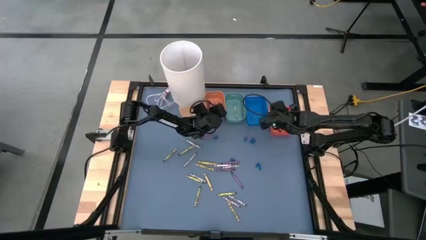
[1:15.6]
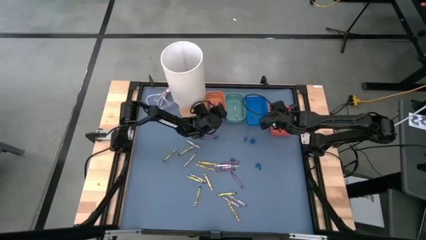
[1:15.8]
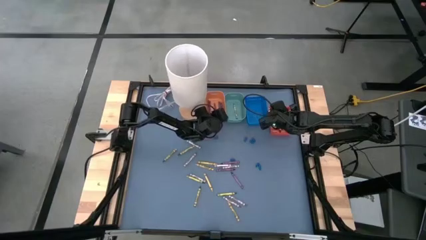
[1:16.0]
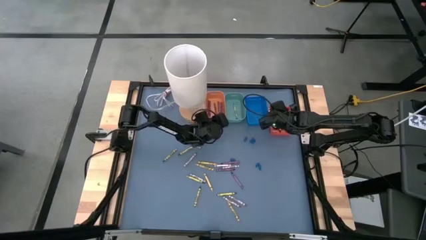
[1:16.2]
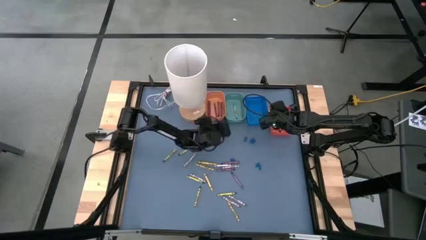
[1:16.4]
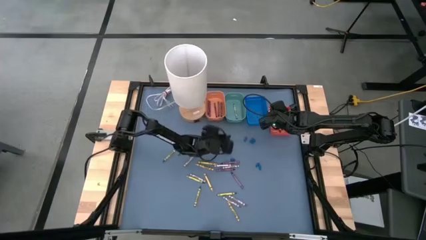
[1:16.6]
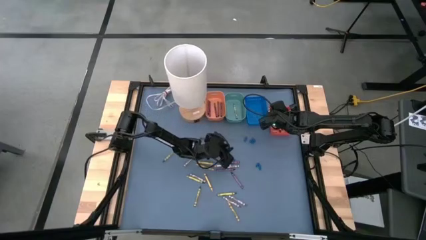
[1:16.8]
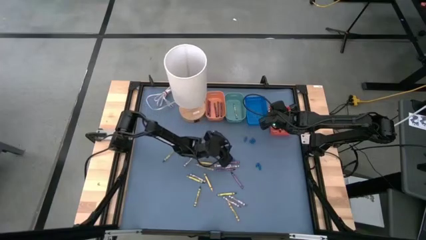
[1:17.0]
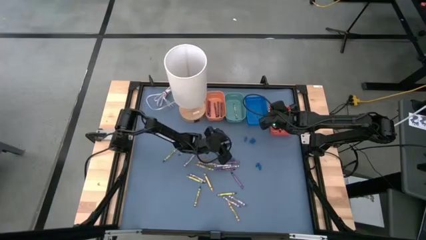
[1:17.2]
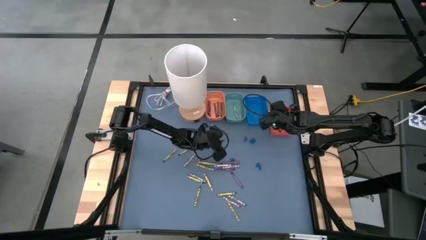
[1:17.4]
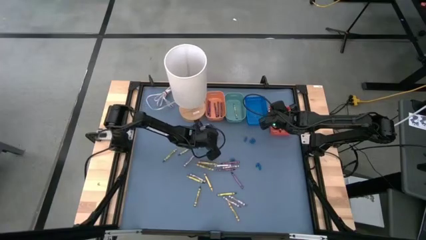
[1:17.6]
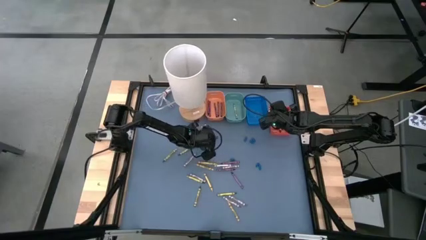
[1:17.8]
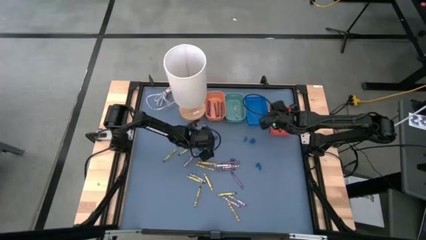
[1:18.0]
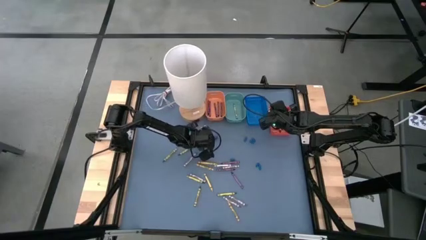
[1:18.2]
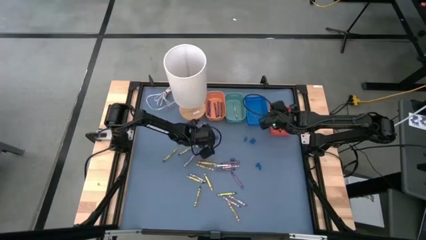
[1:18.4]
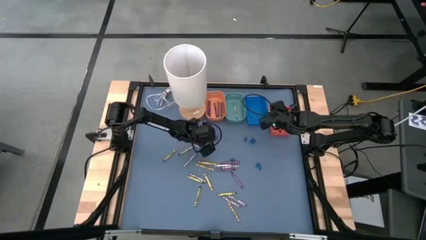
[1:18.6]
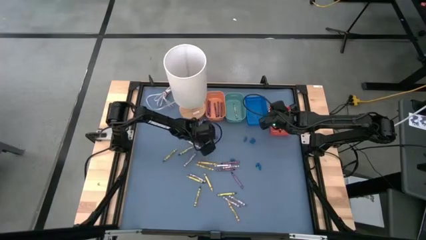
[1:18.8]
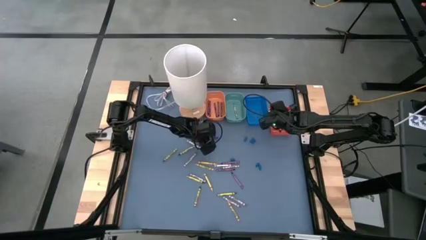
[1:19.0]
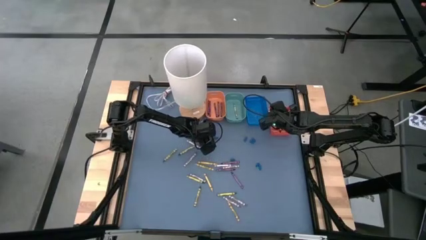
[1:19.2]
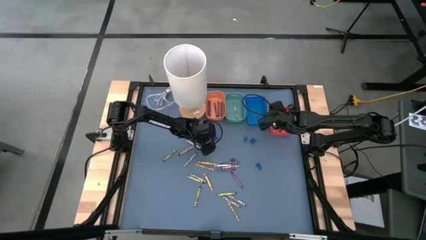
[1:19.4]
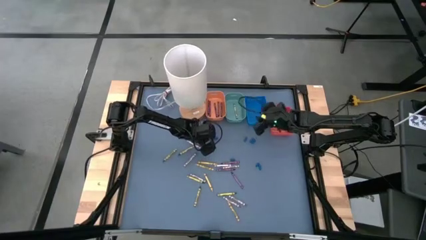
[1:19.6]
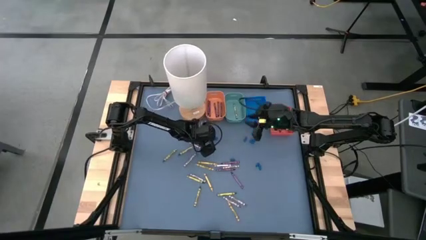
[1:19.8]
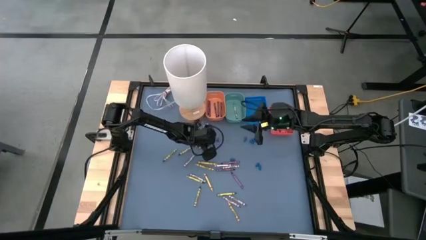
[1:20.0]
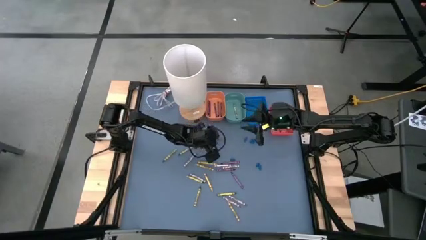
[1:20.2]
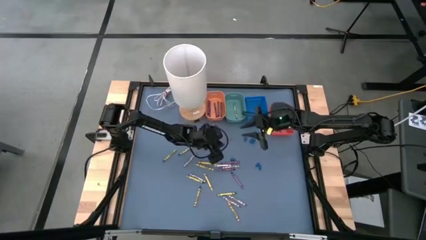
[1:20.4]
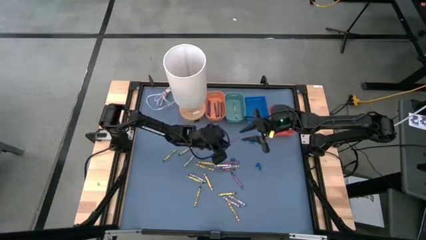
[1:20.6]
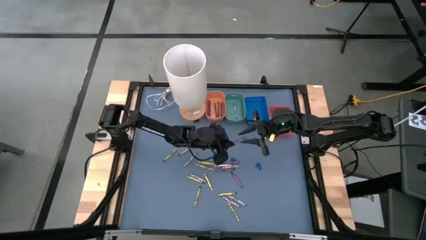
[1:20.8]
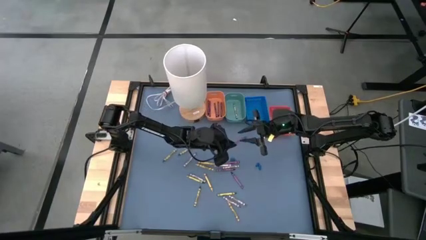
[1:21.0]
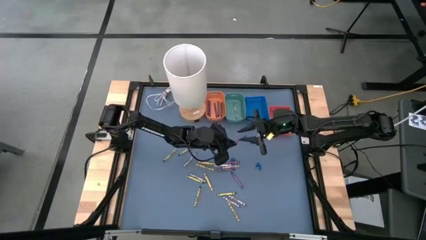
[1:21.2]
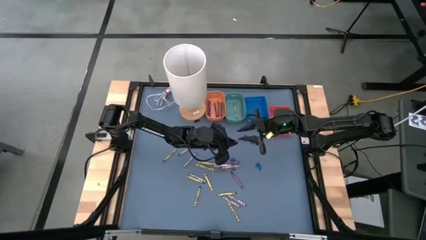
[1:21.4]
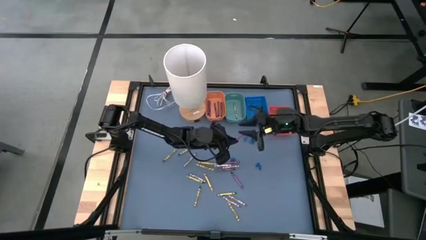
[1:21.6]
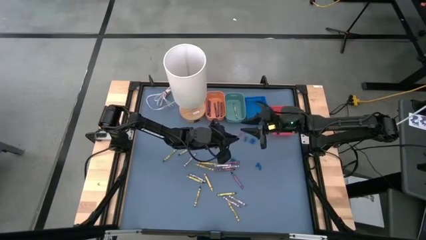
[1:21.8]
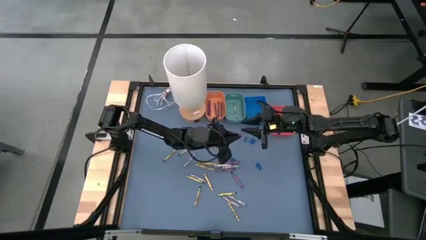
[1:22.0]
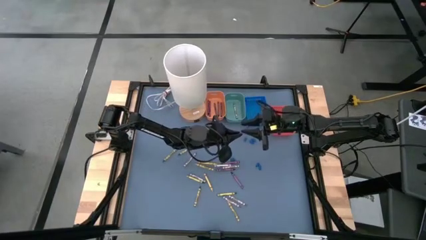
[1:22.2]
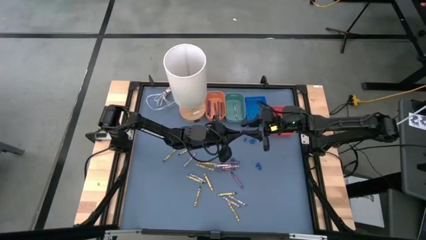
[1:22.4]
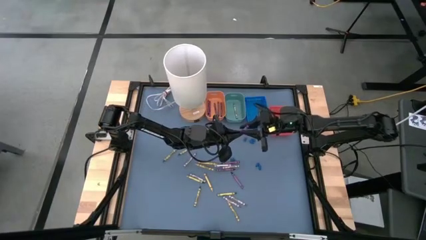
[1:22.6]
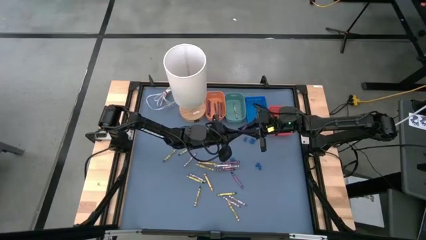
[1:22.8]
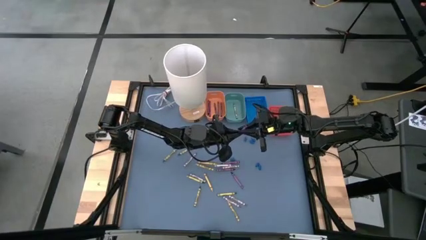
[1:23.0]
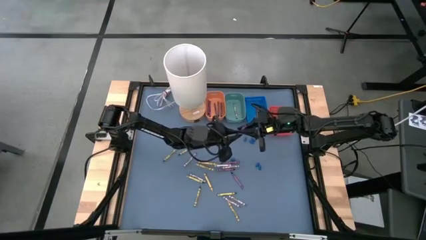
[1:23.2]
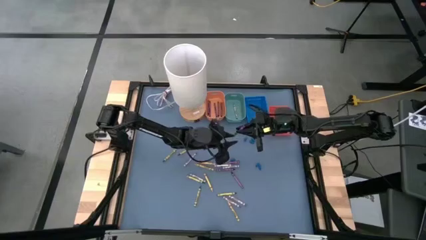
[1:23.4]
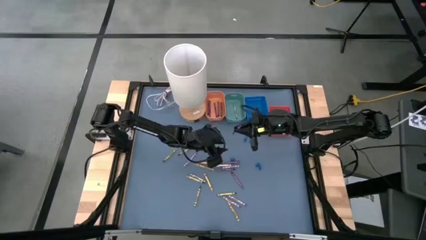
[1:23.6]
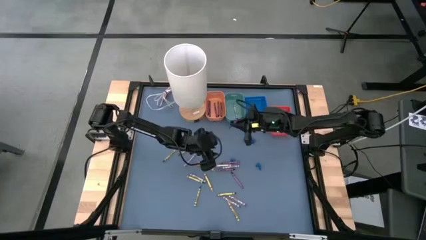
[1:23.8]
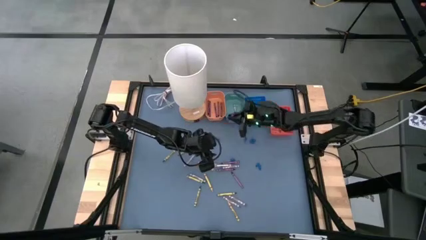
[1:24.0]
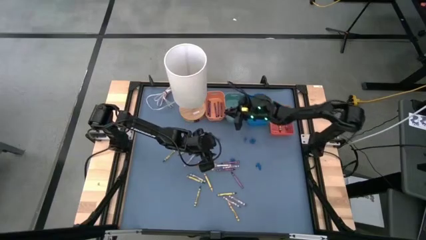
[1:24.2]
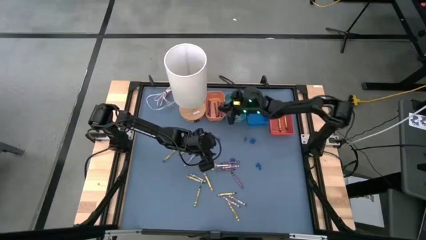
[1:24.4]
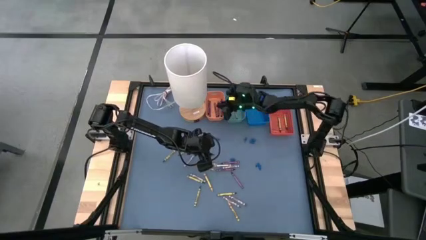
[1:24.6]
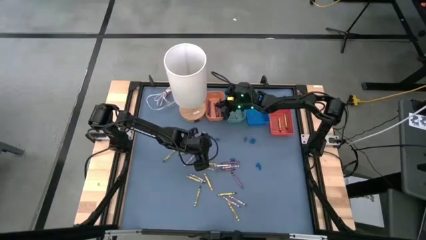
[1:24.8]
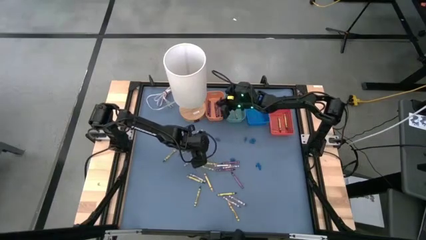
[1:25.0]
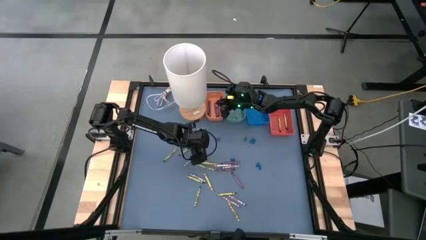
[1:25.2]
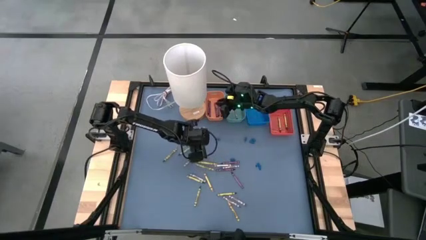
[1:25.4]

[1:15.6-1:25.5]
Task: Sort crayons
Put the purple crayon into the light orange bin

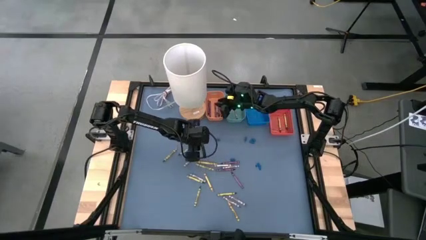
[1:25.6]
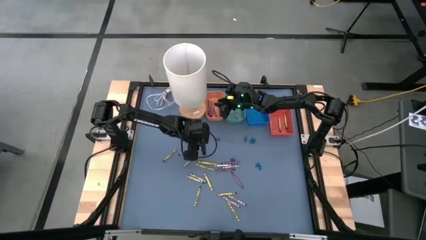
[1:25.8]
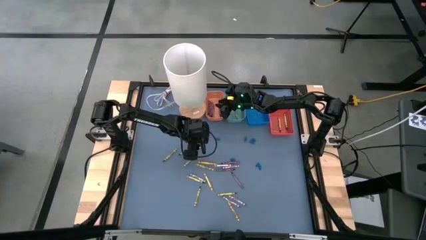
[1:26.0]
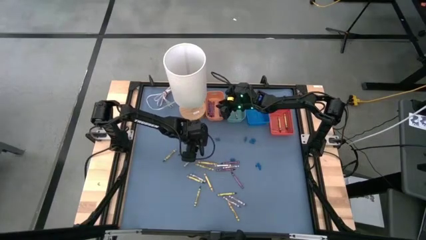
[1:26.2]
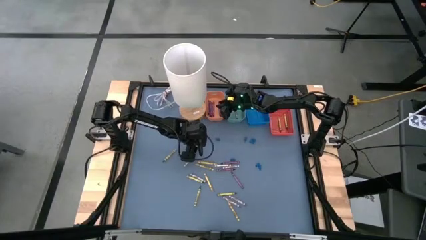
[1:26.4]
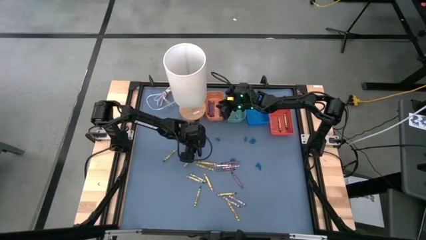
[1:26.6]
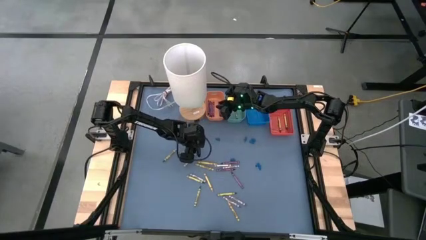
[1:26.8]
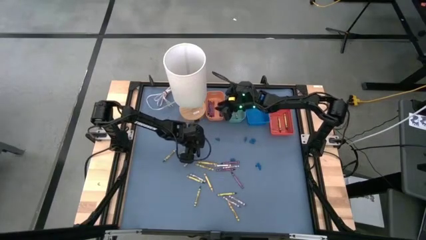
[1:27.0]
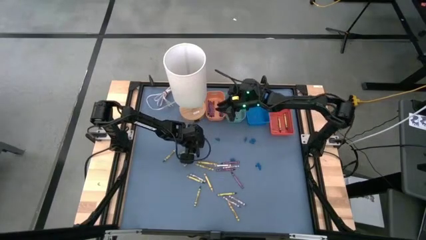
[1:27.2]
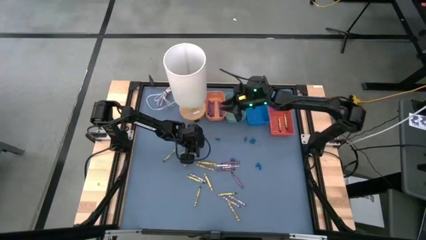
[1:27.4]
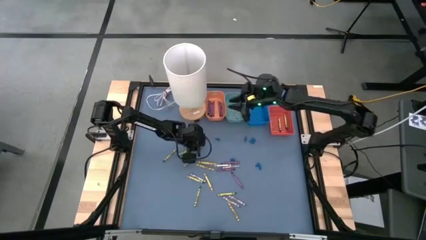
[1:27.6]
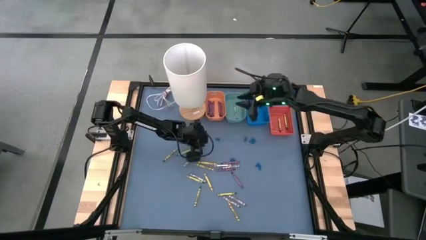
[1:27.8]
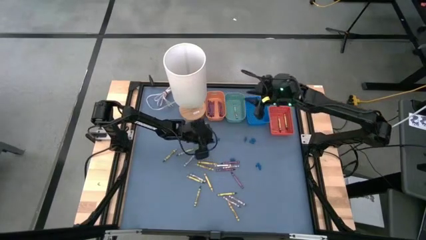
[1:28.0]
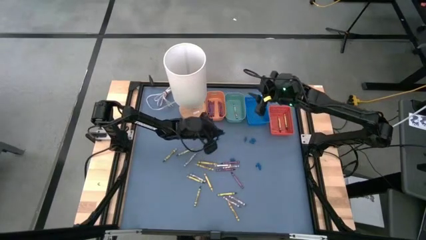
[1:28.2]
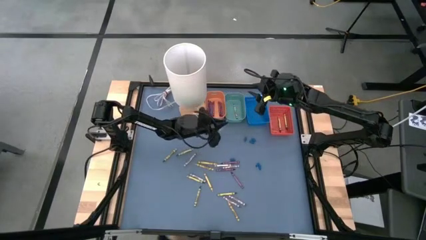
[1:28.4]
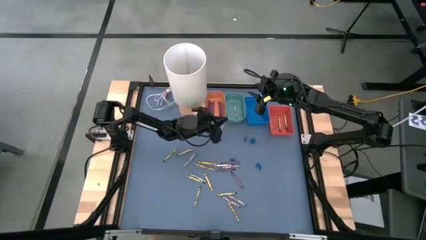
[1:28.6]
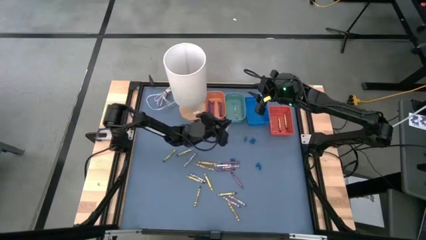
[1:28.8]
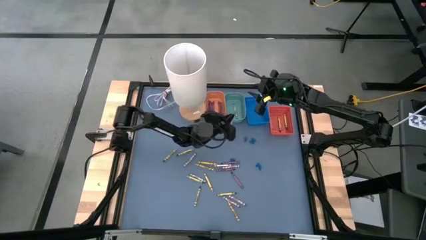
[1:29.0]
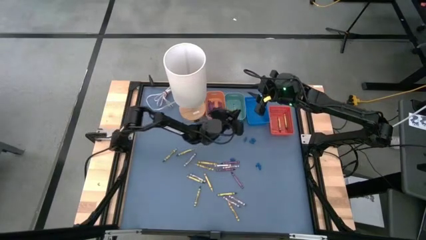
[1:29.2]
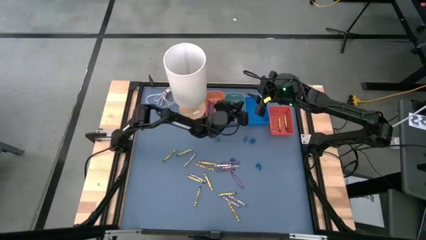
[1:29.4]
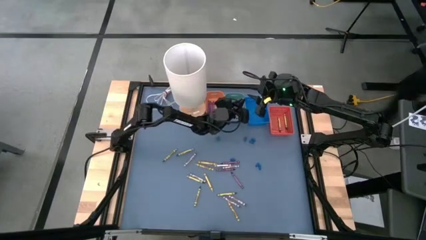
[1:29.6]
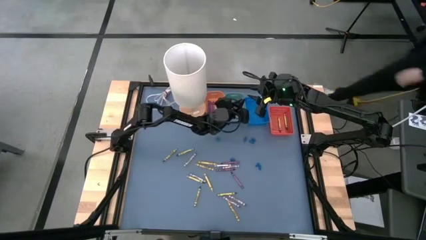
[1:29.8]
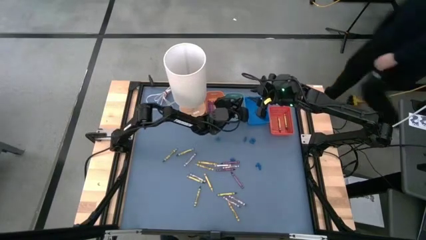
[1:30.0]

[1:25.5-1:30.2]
Put the gray crayon into the green bin

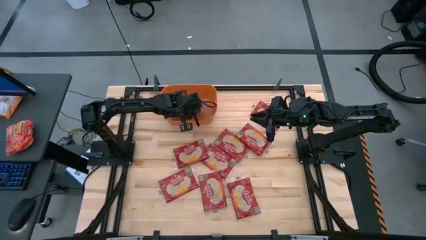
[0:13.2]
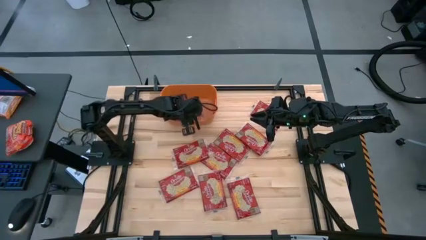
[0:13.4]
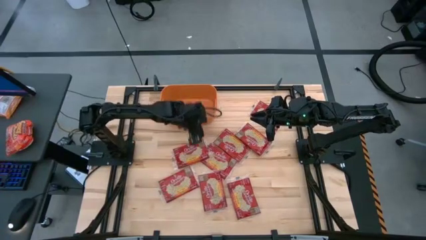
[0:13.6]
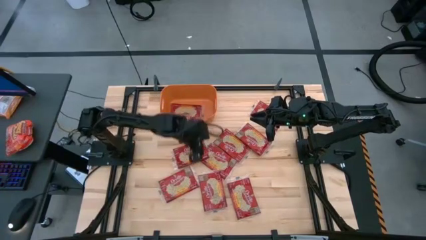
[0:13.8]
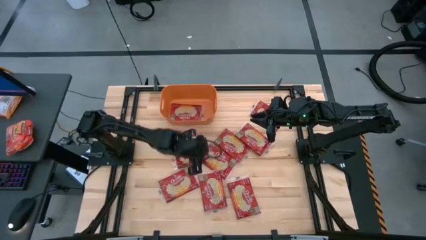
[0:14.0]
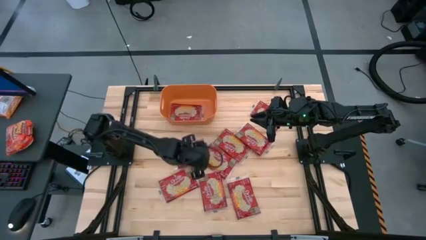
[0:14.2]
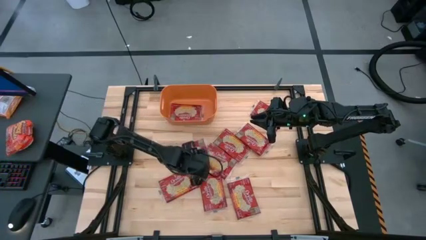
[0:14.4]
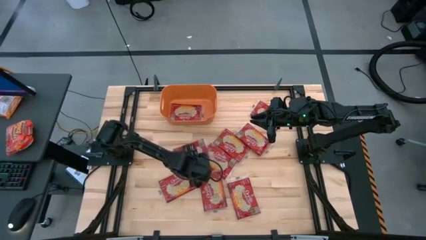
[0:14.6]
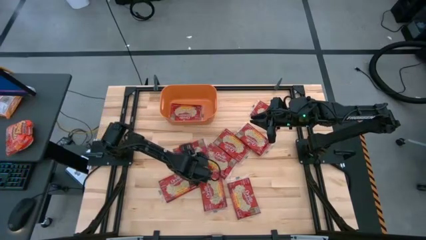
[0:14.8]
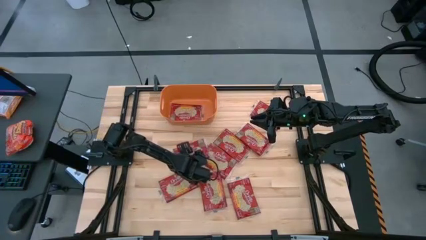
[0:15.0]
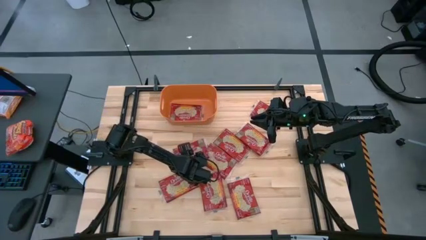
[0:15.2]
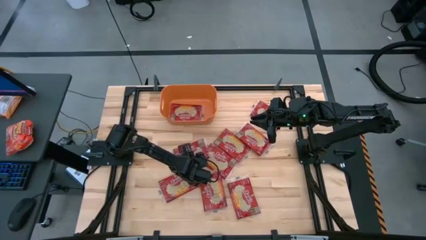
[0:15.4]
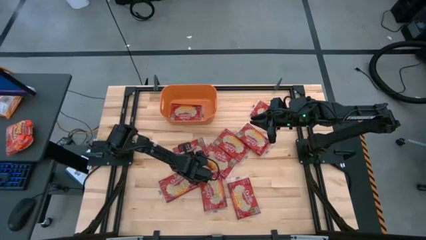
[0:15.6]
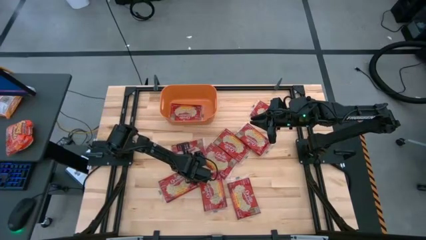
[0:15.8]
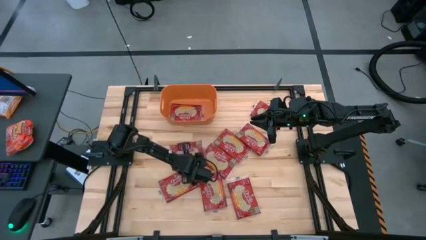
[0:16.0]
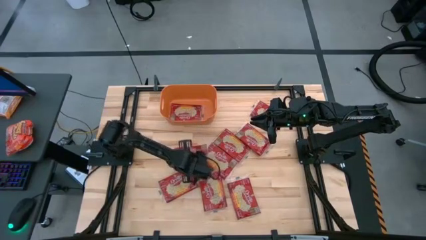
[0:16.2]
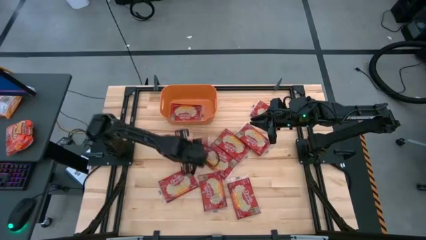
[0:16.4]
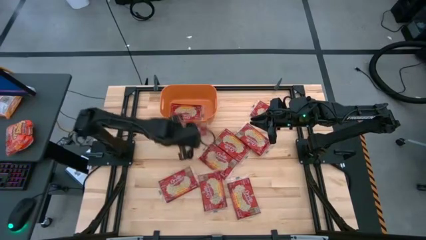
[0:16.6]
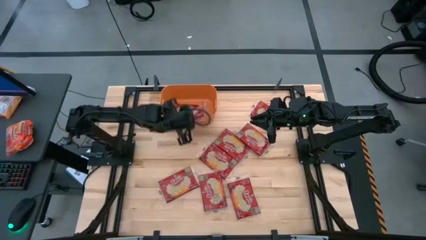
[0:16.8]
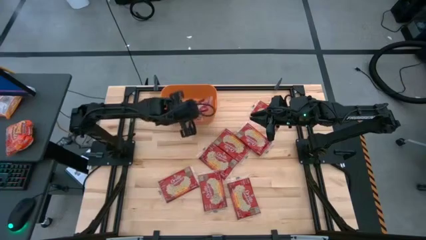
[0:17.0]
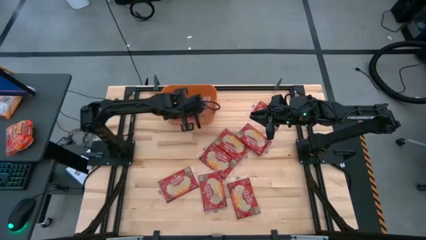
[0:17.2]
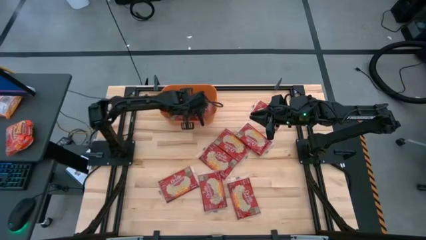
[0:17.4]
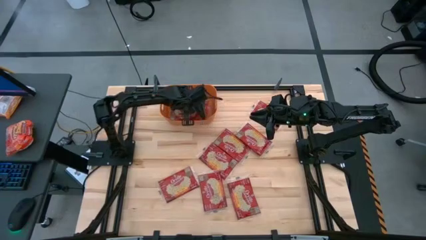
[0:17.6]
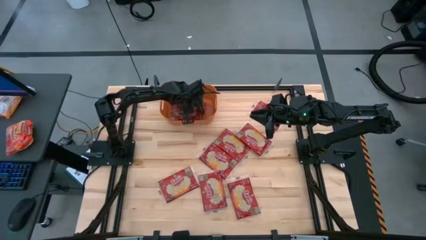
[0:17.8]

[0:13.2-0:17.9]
Task: Sort popcorn bags into baskets
Put the red popcorn bag into the orange bin
